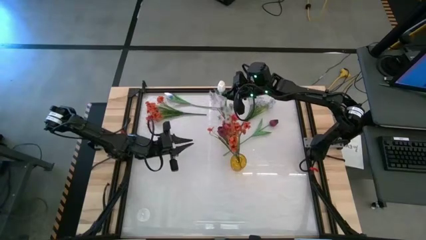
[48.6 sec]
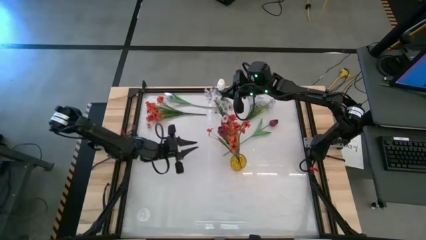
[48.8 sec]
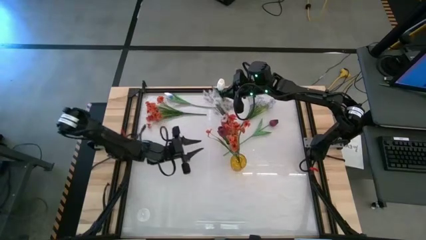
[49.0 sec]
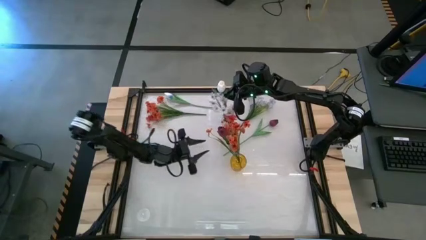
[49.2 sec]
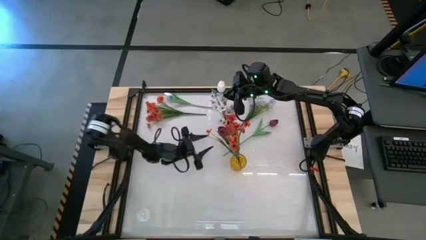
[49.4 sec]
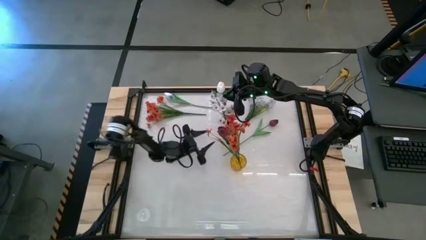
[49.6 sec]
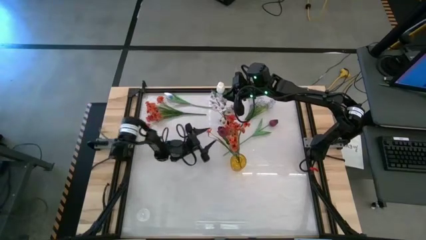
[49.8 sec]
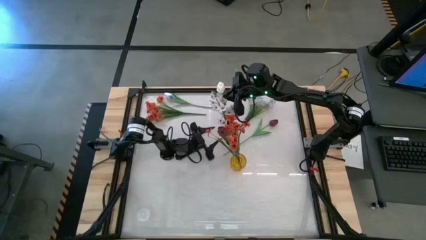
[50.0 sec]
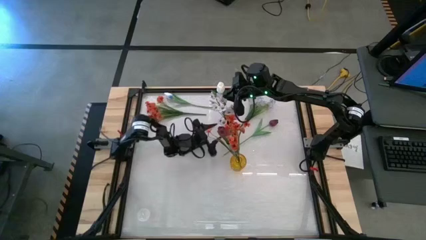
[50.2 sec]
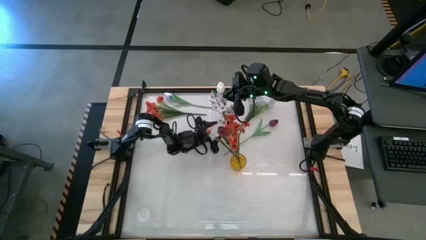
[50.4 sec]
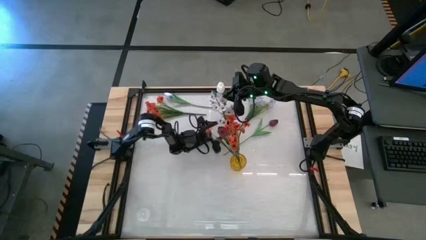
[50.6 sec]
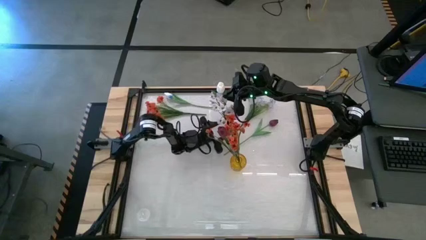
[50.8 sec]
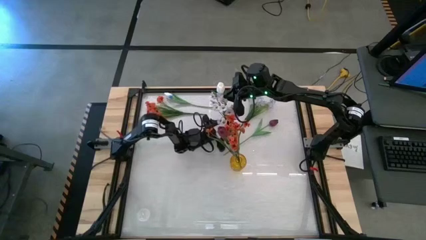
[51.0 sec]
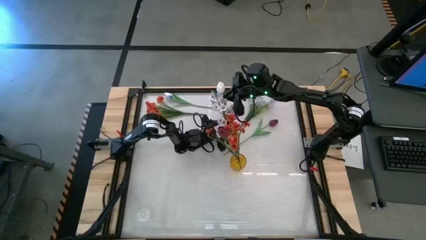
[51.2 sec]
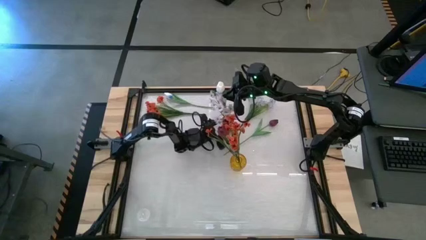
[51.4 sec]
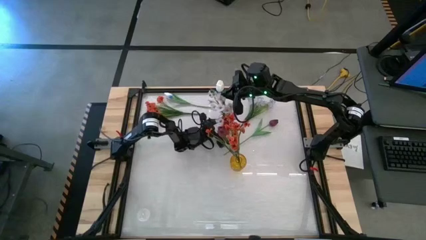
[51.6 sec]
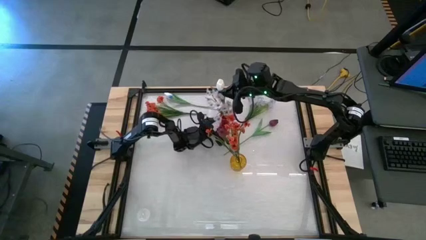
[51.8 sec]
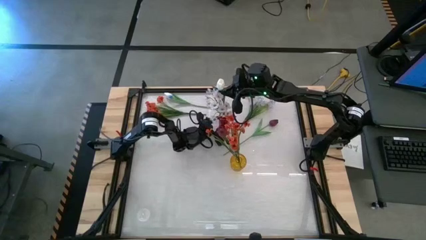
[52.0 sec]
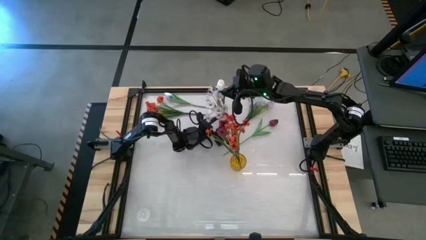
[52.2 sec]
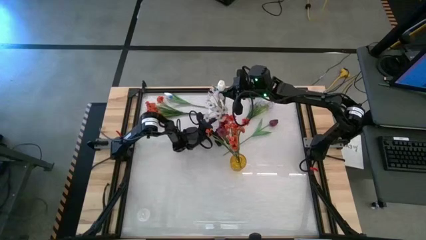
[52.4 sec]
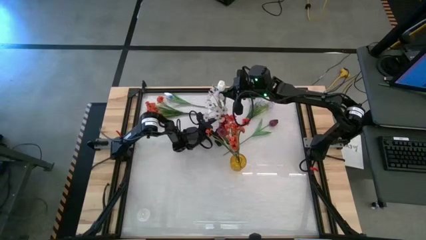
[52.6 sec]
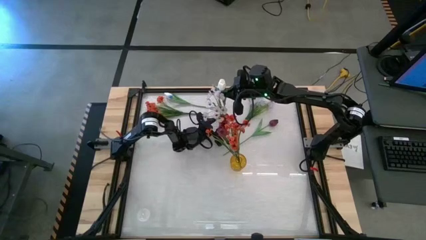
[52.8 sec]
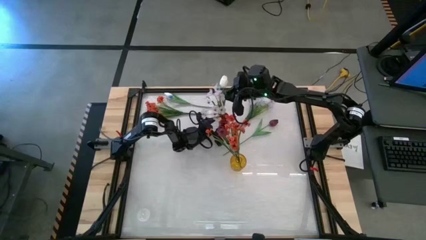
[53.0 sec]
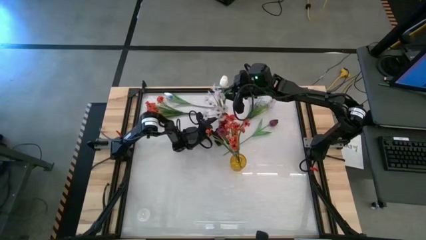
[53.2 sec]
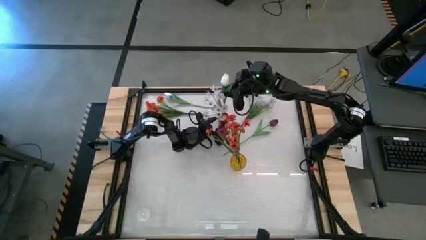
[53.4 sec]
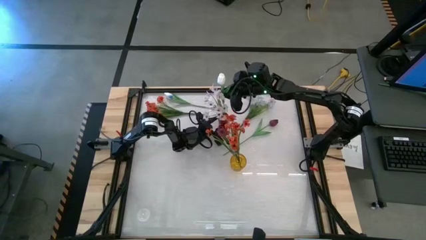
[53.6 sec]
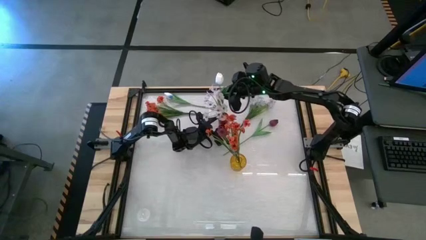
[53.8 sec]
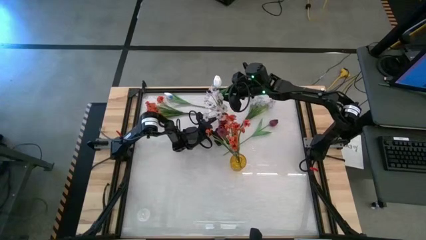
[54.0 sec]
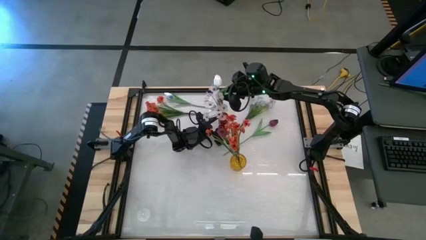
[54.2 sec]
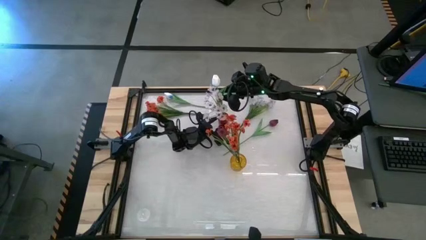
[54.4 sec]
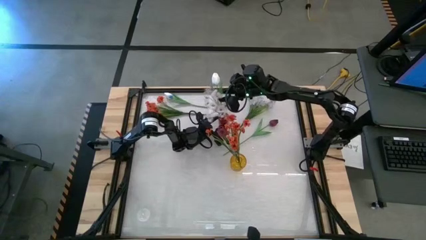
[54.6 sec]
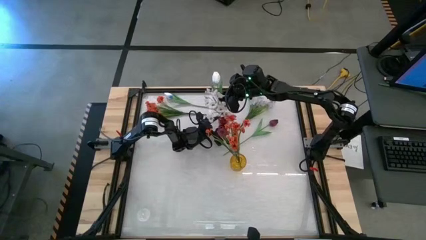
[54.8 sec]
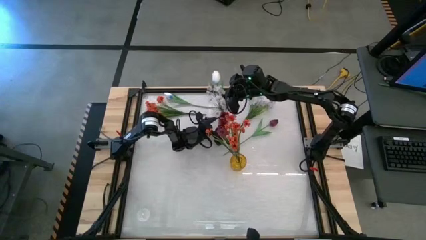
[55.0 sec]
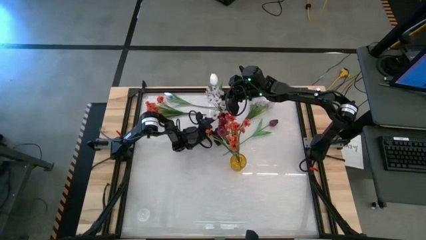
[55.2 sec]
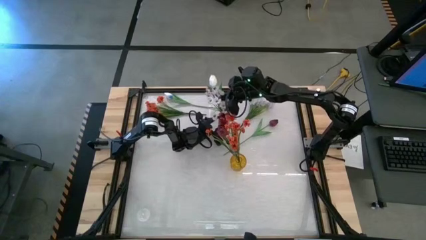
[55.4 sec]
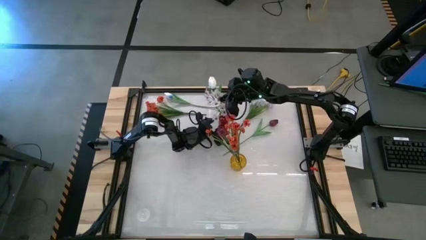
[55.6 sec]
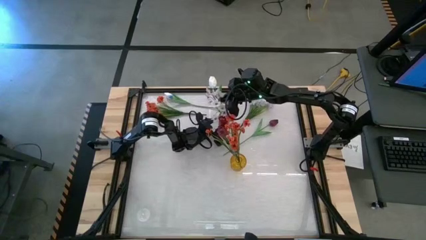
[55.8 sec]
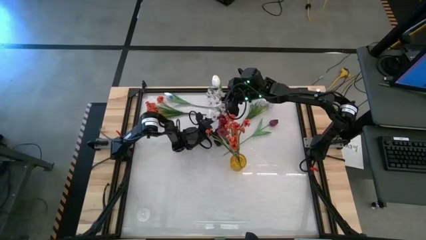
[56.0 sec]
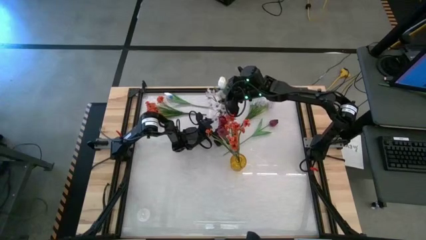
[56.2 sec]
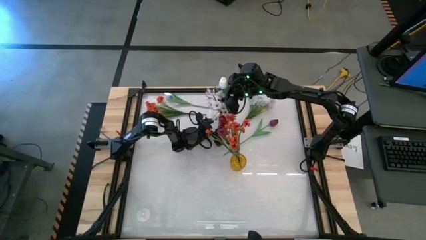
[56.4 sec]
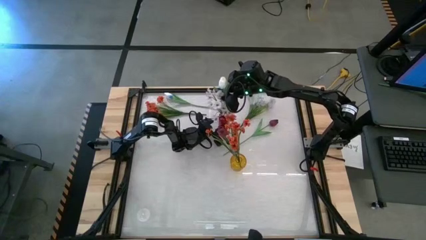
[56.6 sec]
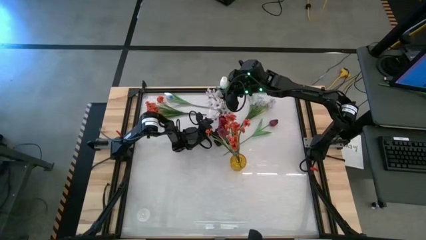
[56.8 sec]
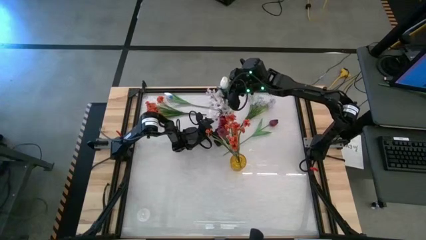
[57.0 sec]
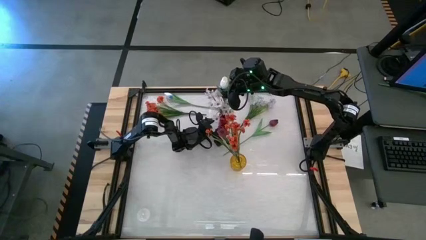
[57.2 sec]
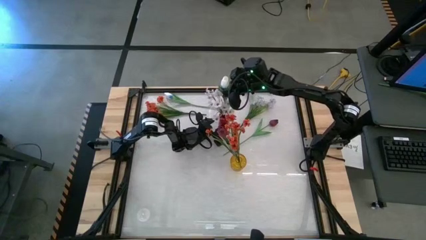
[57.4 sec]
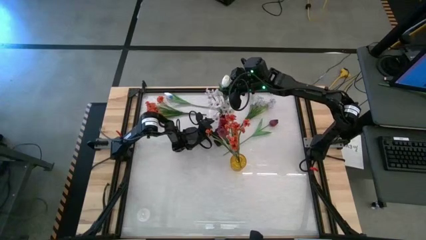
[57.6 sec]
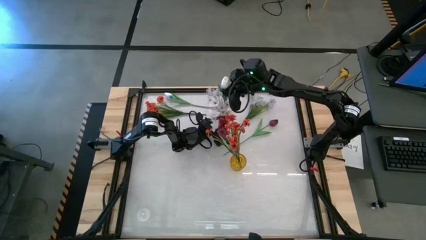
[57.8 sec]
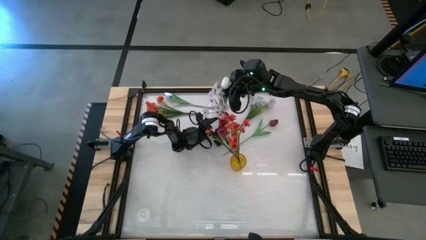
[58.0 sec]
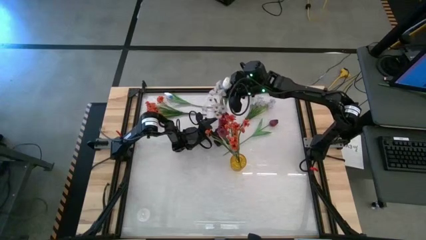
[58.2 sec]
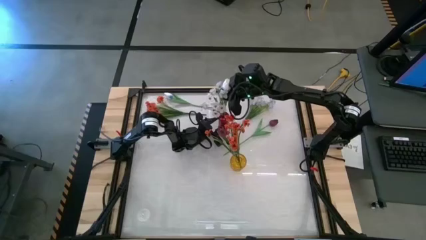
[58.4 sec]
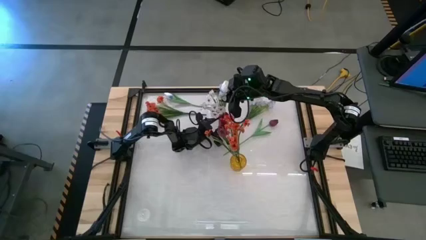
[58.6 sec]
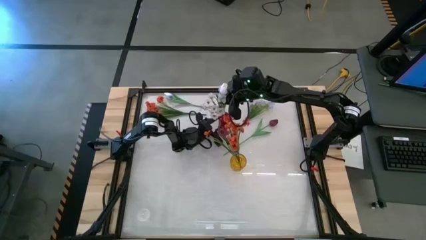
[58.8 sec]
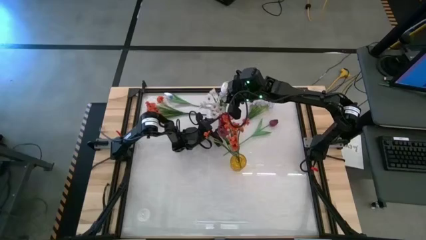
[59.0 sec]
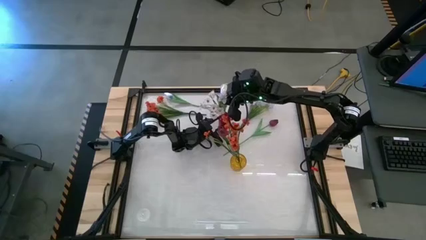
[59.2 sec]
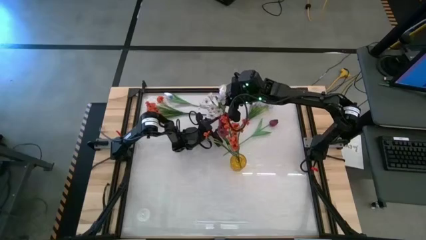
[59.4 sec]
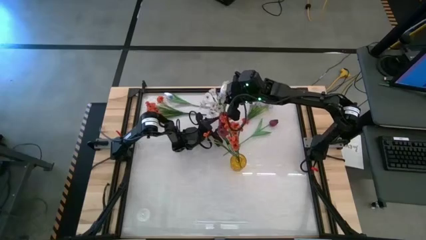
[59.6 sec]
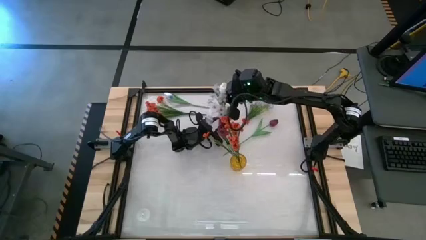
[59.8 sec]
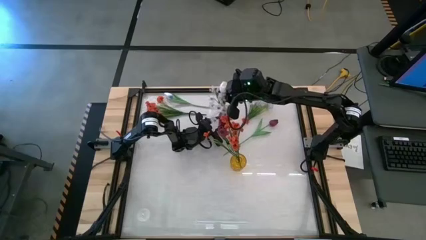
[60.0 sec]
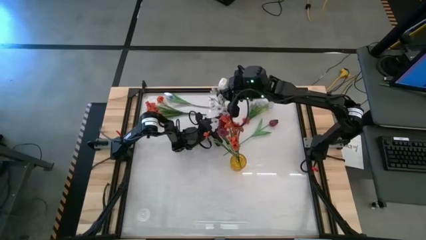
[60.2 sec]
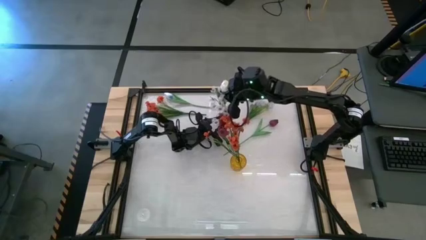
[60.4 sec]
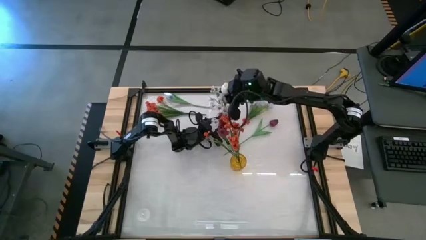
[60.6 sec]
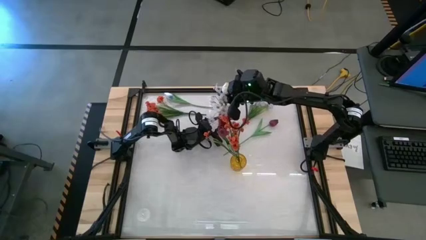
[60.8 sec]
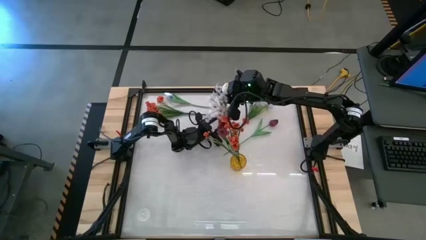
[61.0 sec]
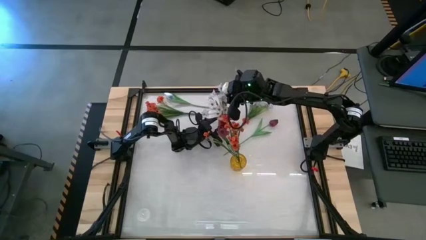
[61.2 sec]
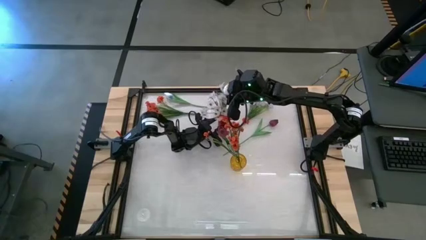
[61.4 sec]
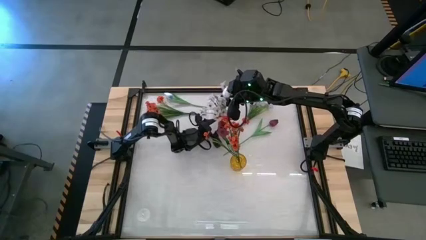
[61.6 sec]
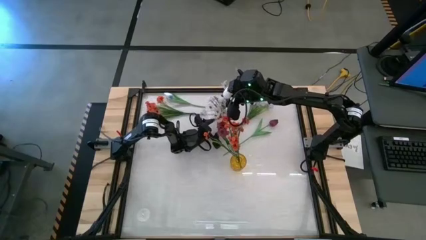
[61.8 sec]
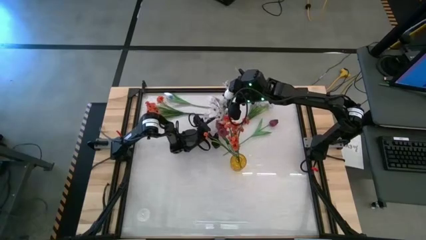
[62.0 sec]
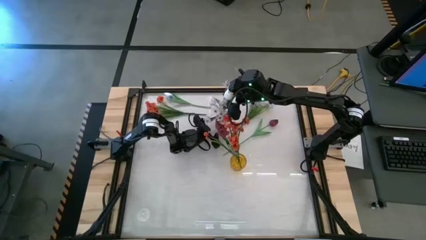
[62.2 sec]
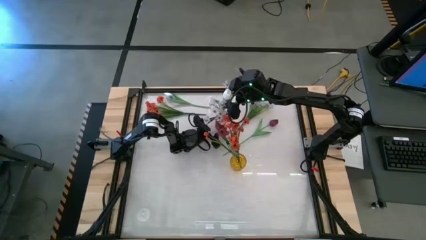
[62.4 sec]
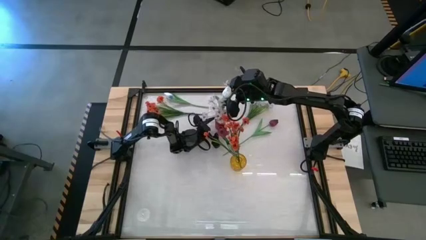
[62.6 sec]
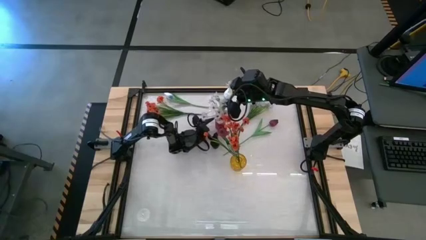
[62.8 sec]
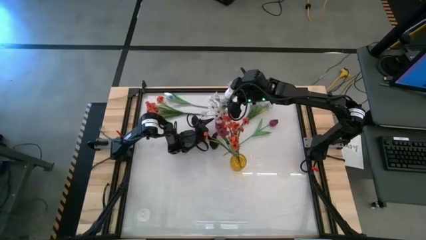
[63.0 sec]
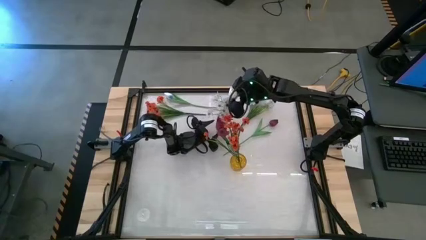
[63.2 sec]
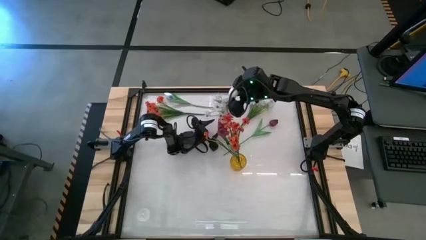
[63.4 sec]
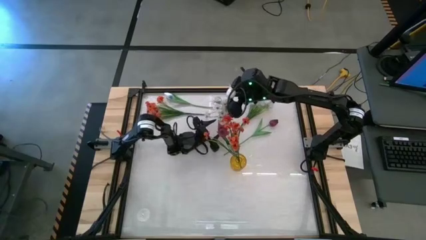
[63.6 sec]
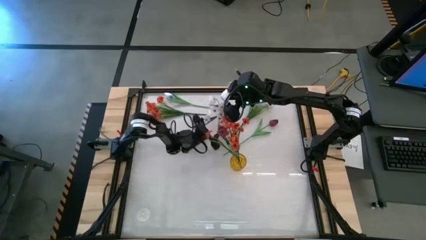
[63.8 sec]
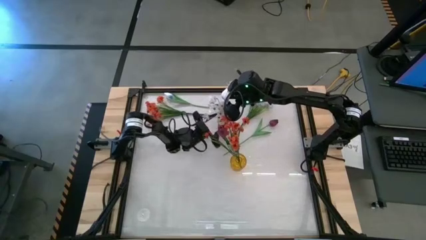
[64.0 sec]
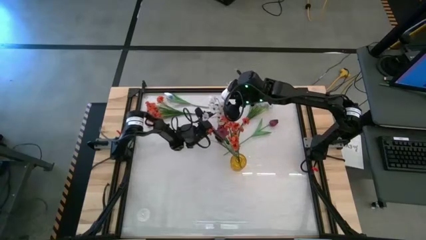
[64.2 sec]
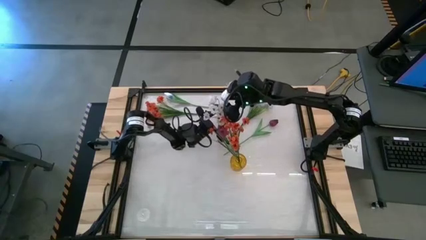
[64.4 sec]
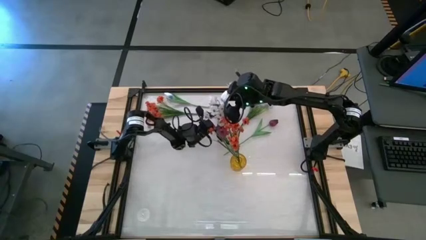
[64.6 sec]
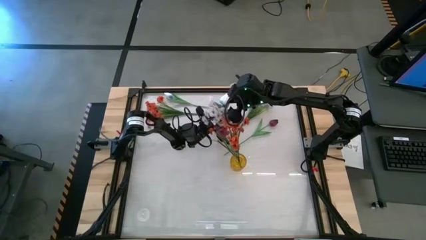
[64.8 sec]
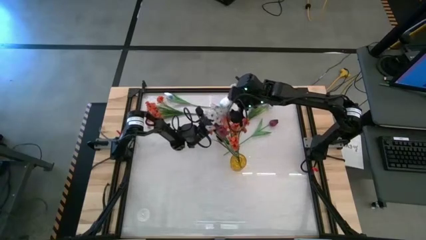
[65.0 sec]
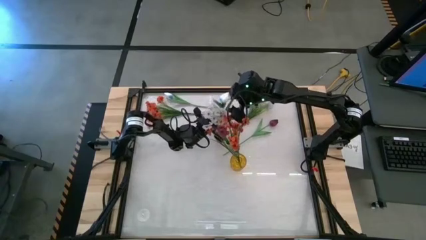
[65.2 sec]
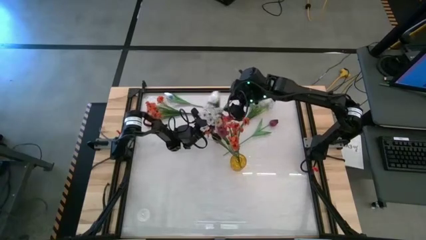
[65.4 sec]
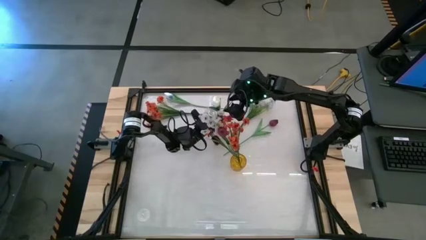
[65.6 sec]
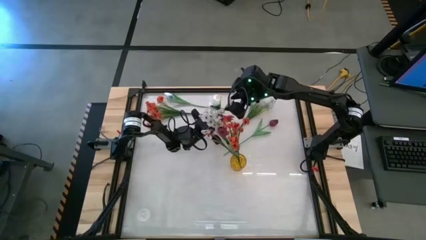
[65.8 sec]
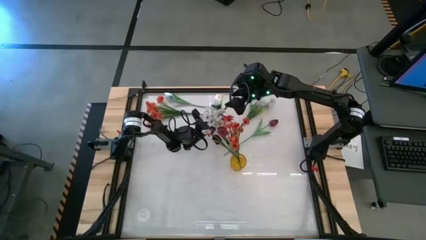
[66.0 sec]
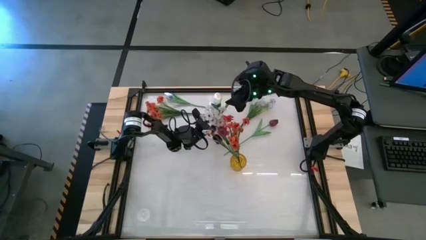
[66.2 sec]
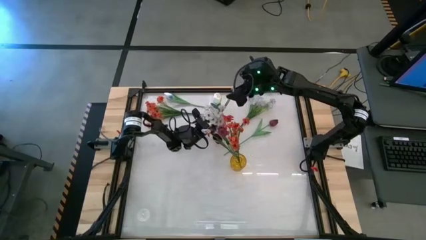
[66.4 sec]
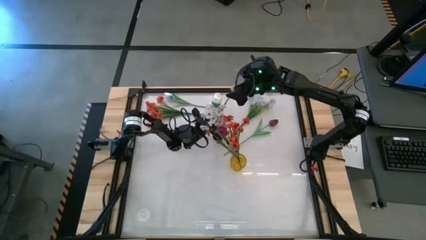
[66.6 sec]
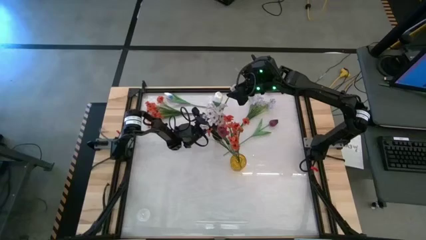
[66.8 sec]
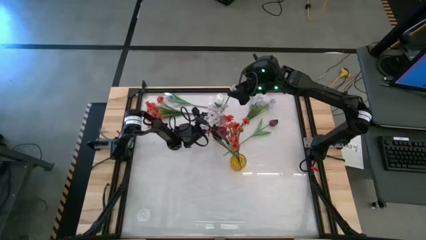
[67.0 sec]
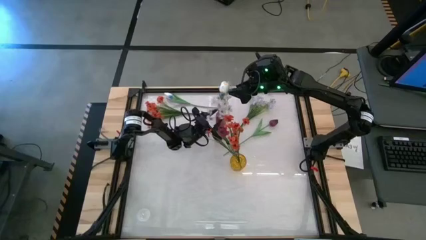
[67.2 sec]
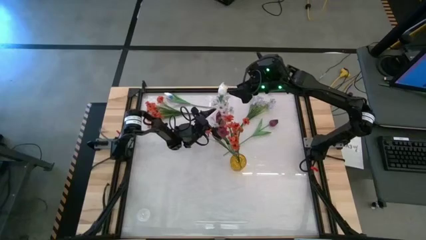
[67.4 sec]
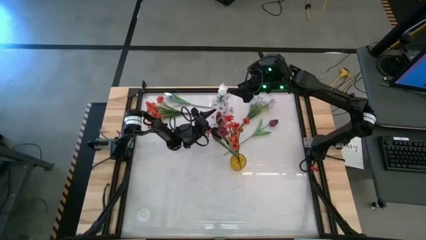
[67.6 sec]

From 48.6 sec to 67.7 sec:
Task: Sort flowers into vase by color
Put the bottom white flower into the red vase
